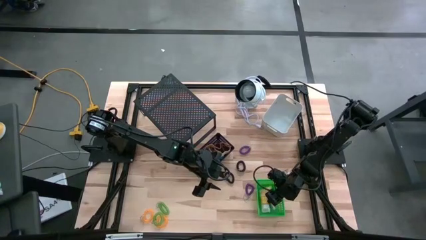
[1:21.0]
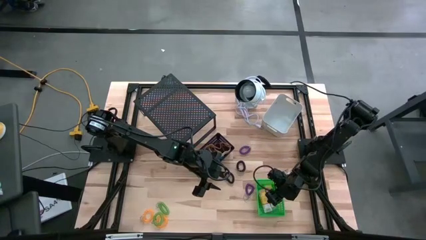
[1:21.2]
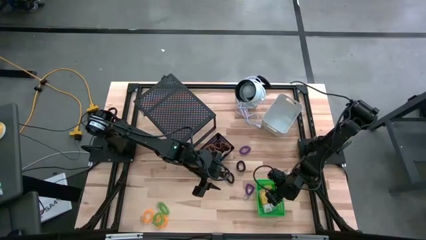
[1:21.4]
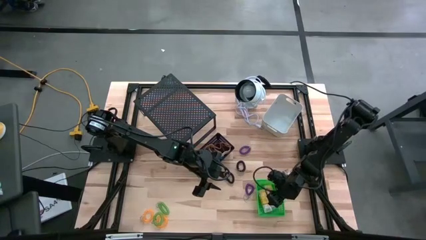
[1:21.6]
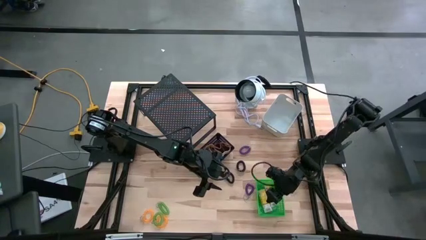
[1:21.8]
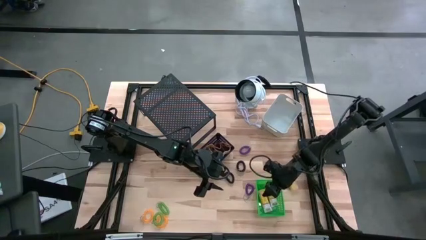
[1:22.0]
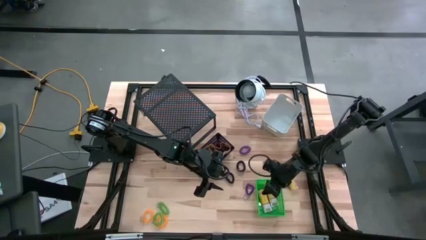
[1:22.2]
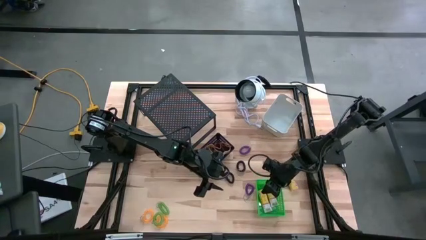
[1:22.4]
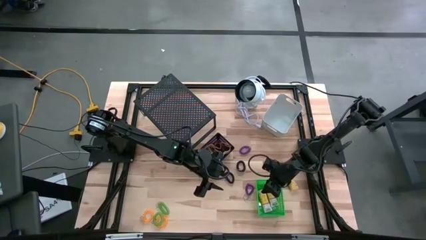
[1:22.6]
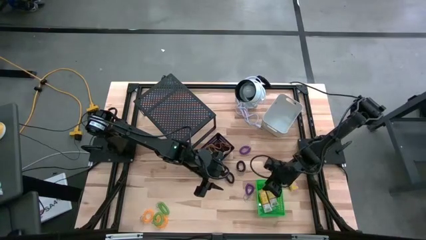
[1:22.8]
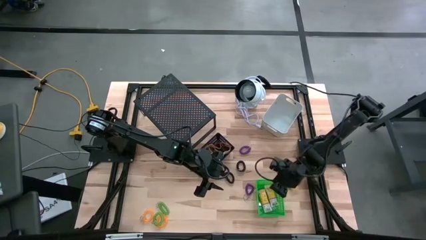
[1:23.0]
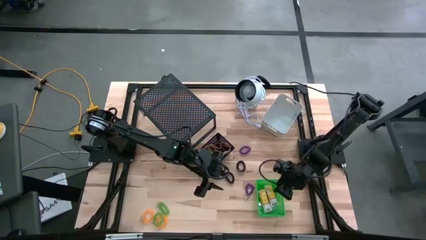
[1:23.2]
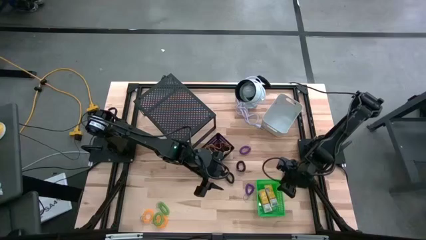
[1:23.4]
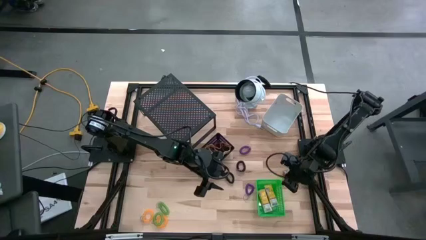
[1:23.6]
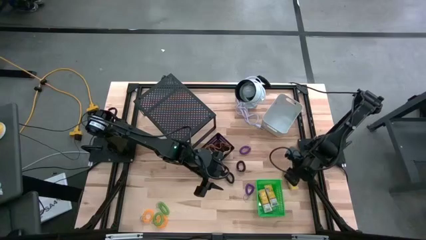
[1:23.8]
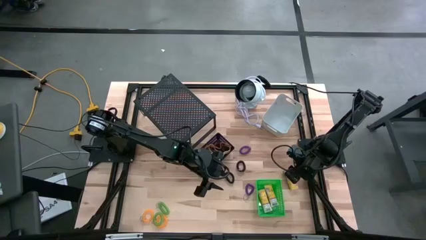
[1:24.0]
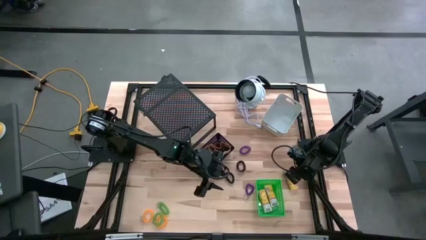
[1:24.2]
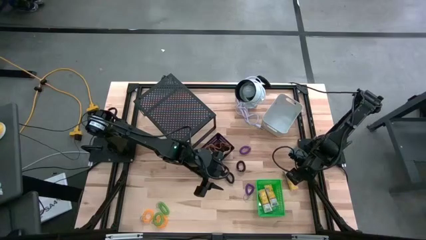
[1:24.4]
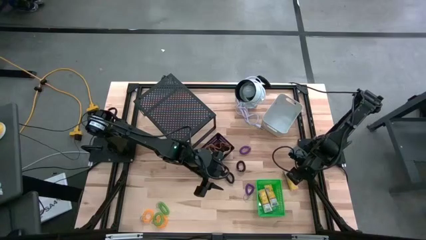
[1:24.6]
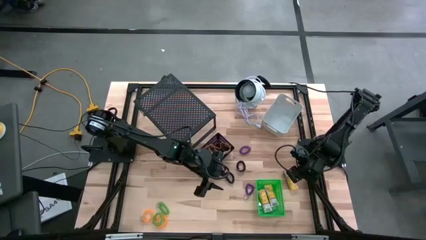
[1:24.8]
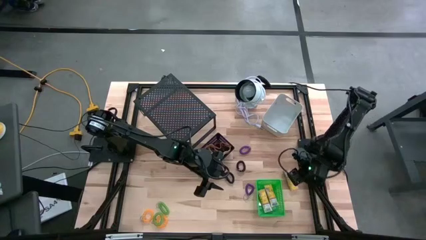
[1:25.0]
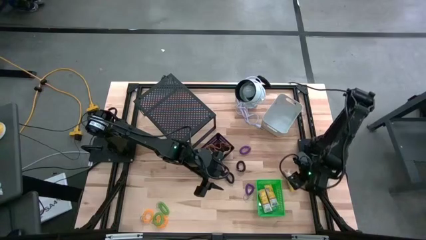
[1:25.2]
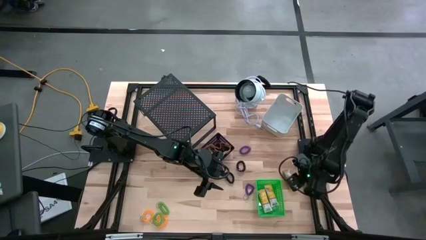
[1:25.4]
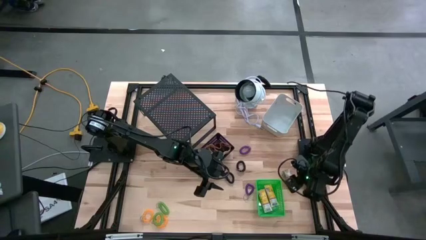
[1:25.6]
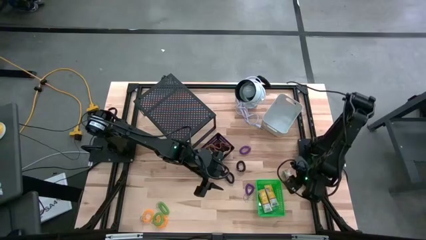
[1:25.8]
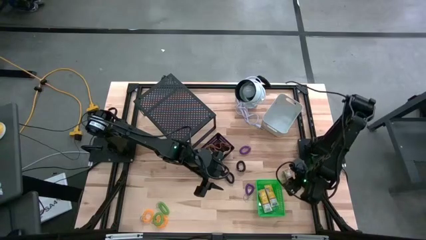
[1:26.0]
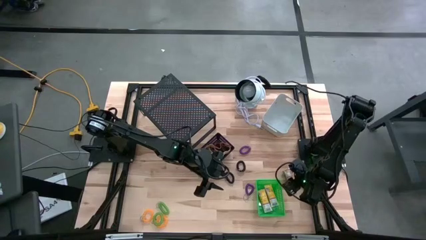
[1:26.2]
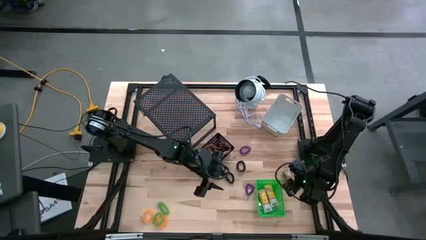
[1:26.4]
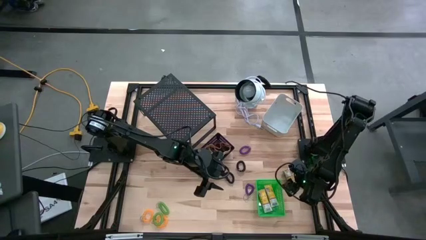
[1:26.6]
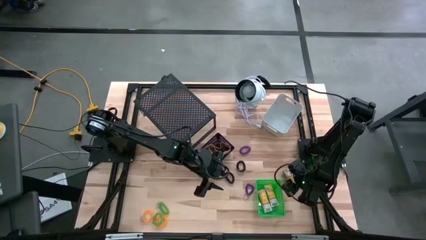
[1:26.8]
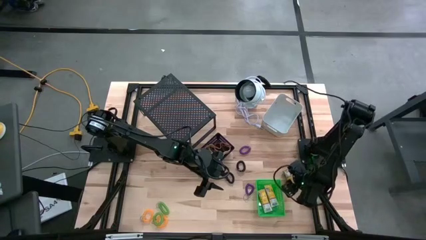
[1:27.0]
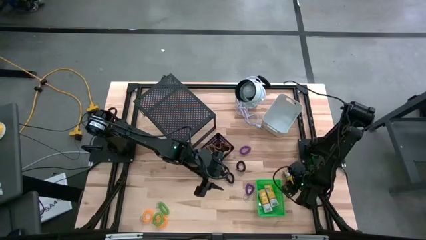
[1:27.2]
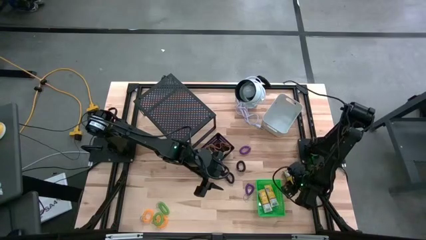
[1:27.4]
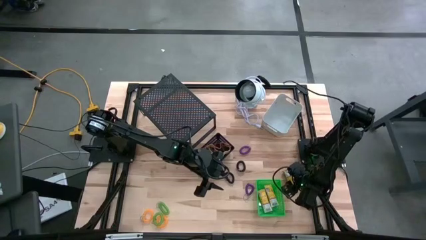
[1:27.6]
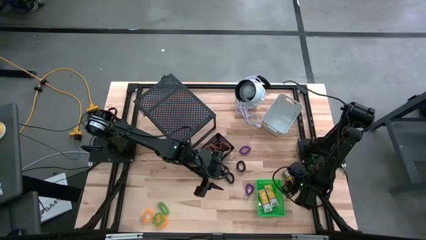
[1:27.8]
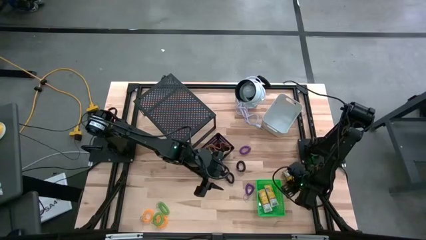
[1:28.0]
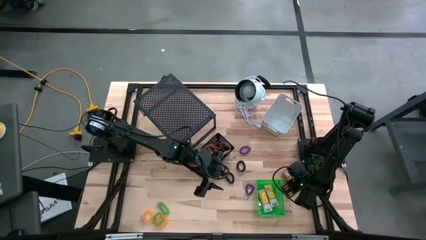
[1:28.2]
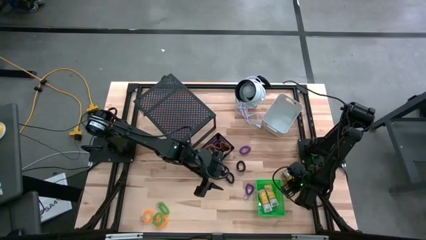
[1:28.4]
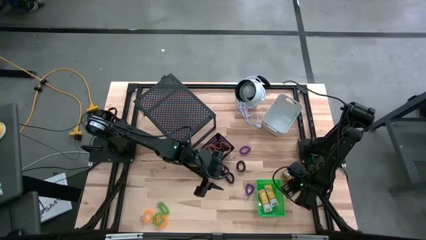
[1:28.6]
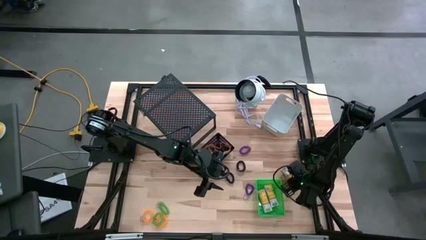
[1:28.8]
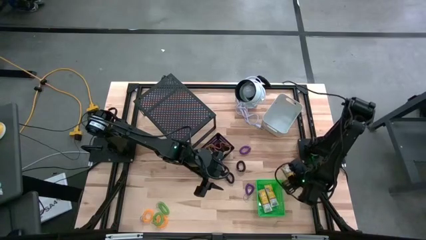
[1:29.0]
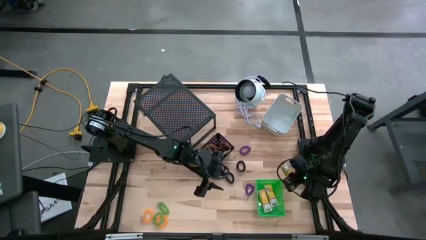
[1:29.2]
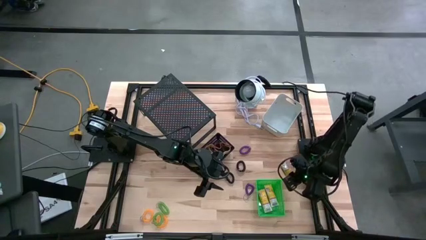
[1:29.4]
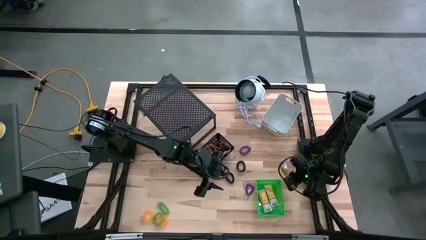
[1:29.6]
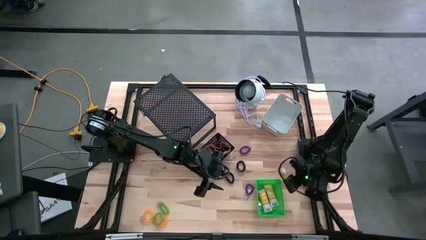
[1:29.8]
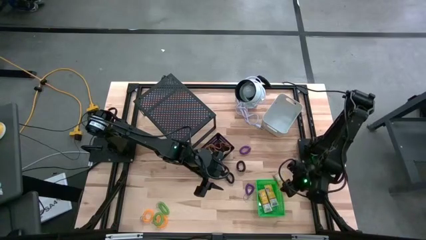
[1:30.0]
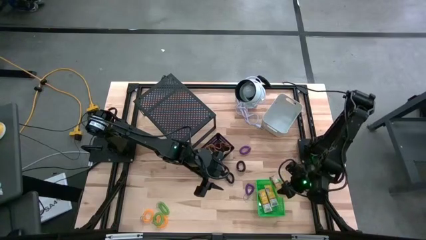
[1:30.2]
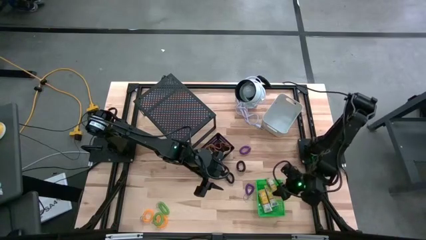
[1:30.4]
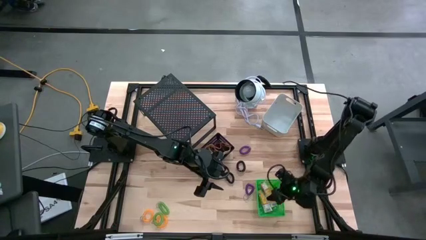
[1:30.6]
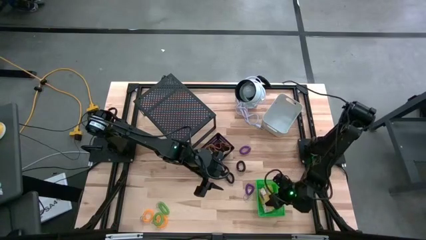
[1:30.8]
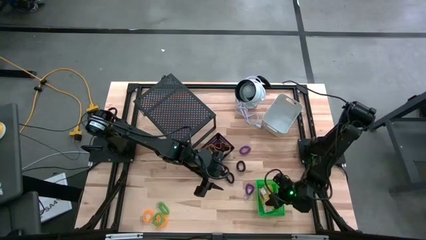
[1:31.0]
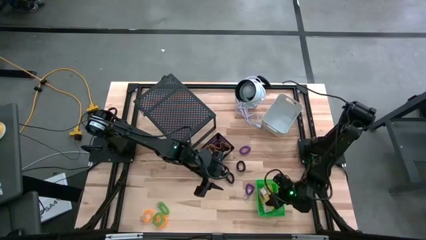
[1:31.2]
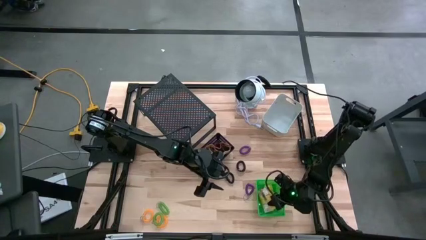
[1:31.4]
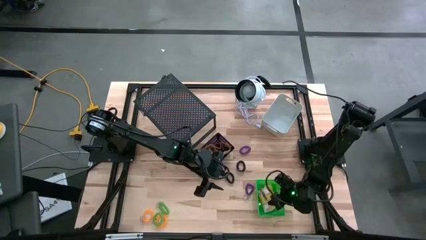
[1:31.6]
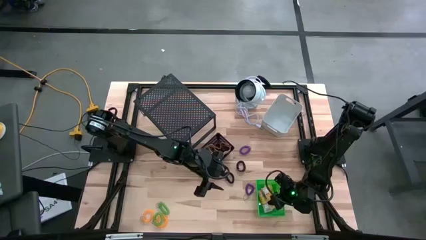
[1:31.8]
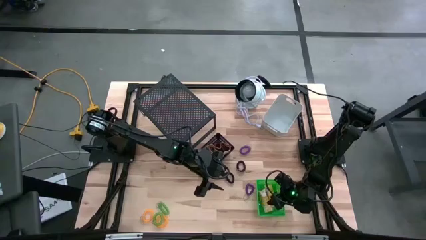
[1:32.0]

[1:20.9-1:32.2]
Task: Pick & Place Office Desk Supplies
Put the crayon box into the green bin

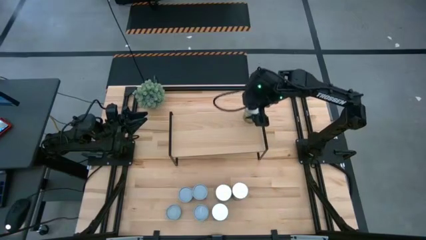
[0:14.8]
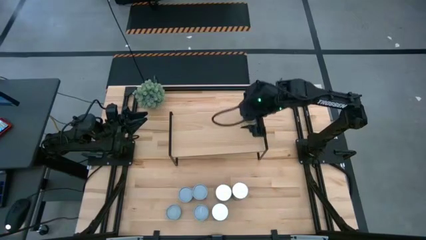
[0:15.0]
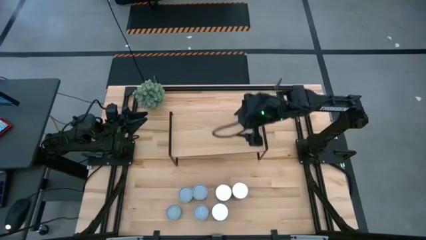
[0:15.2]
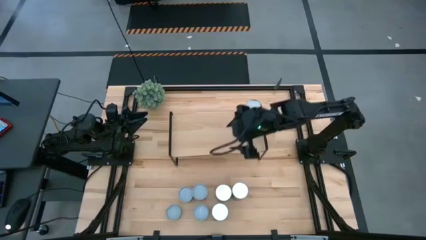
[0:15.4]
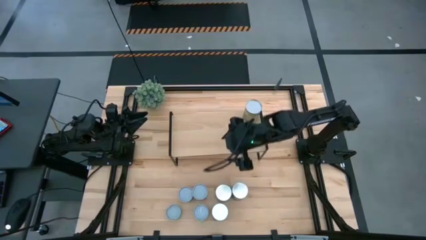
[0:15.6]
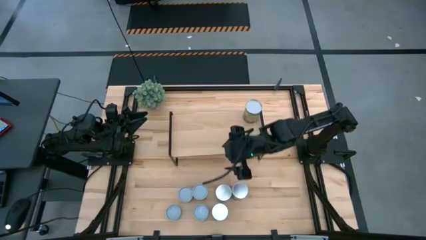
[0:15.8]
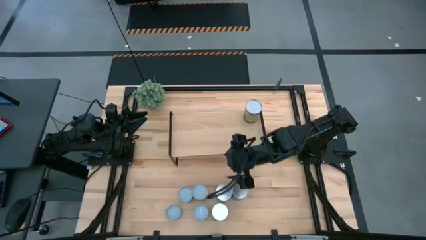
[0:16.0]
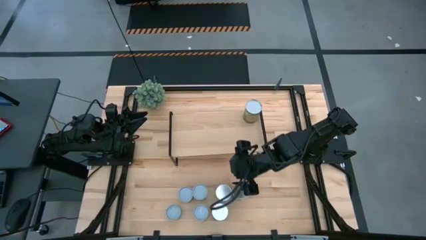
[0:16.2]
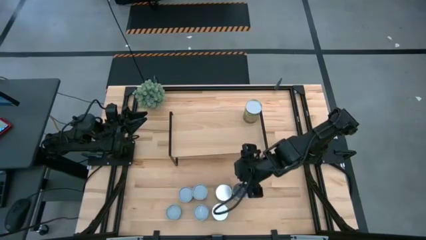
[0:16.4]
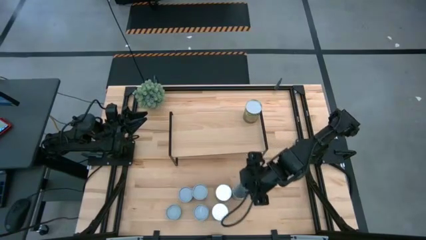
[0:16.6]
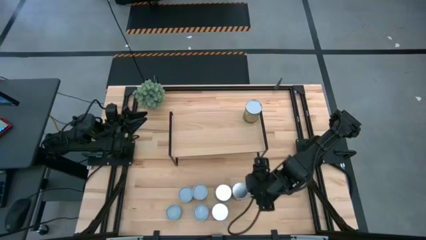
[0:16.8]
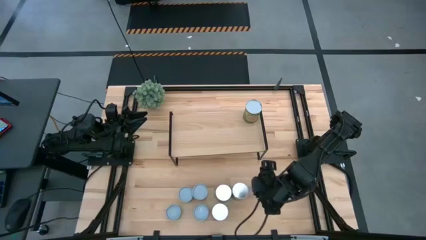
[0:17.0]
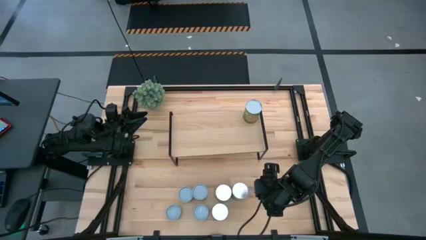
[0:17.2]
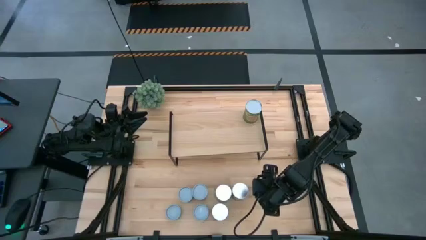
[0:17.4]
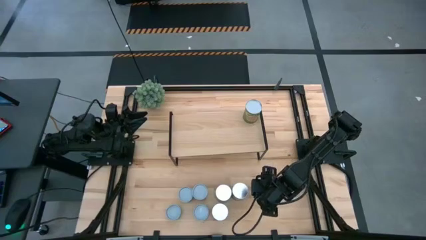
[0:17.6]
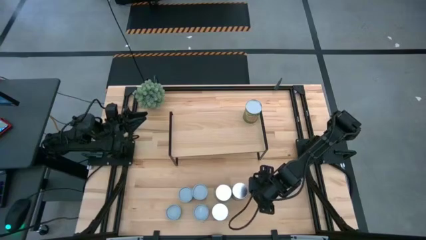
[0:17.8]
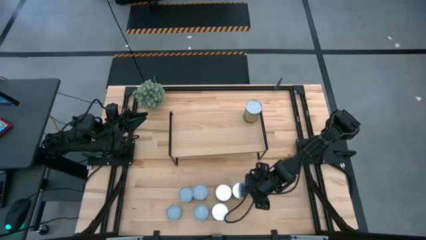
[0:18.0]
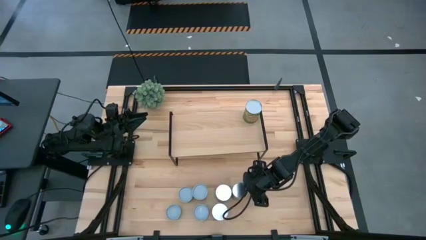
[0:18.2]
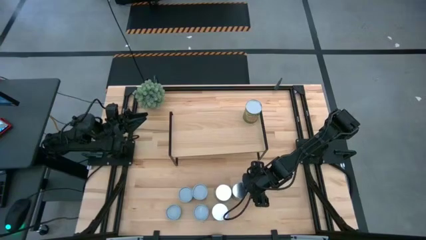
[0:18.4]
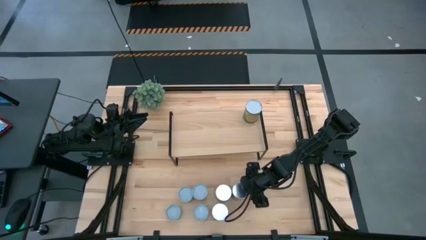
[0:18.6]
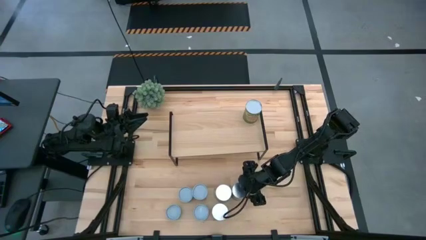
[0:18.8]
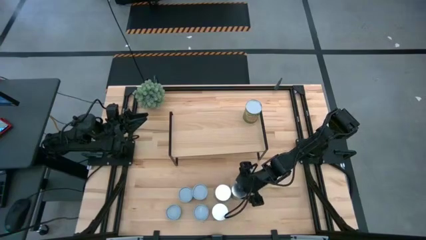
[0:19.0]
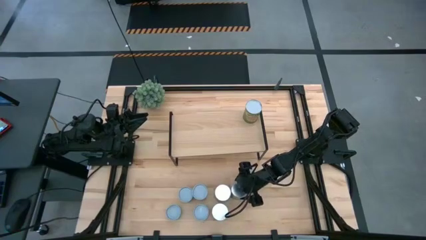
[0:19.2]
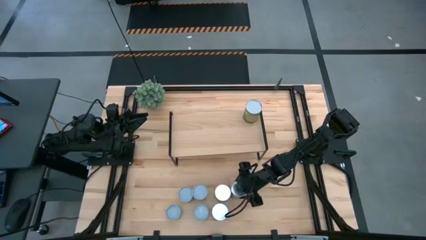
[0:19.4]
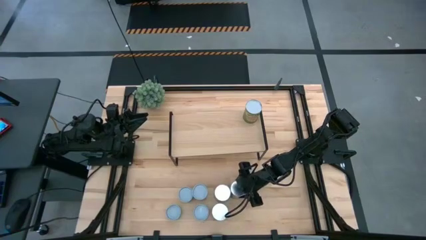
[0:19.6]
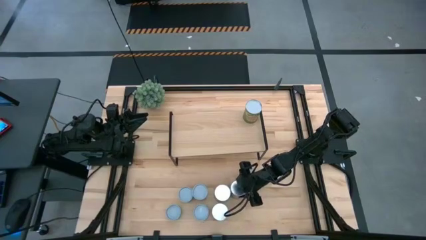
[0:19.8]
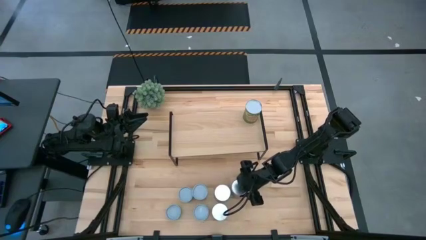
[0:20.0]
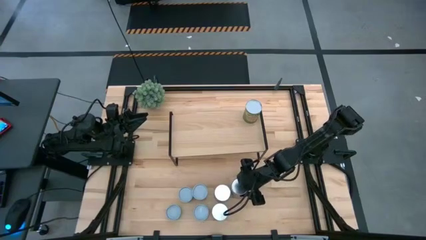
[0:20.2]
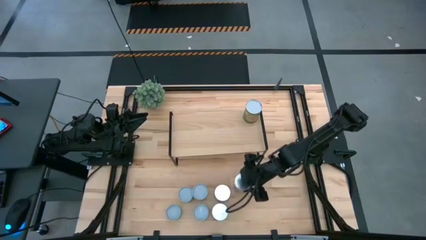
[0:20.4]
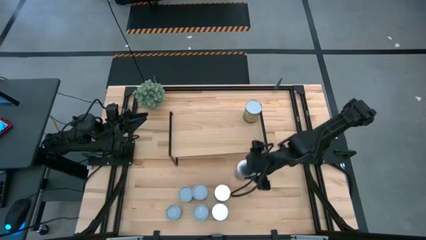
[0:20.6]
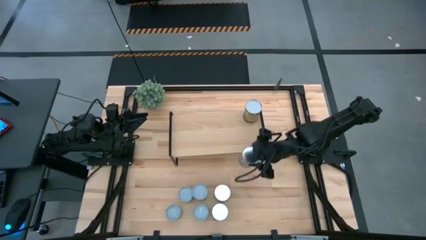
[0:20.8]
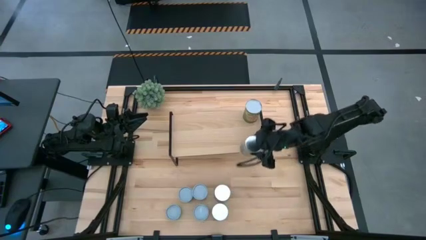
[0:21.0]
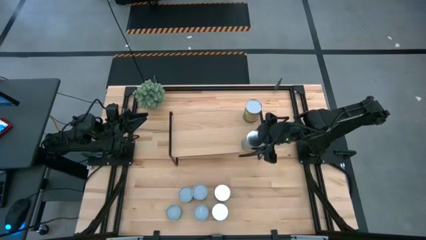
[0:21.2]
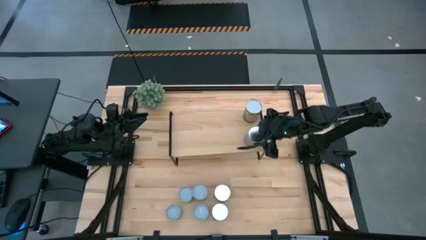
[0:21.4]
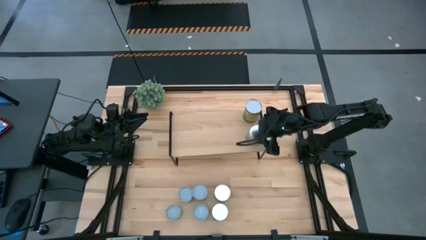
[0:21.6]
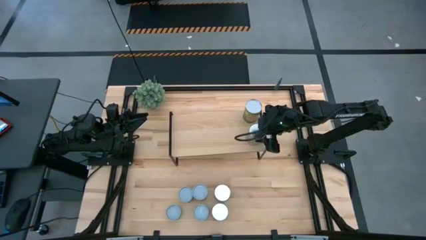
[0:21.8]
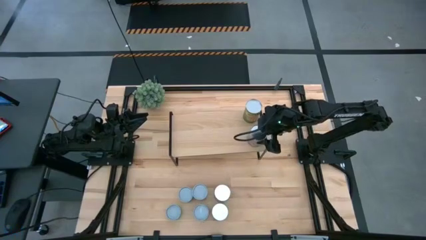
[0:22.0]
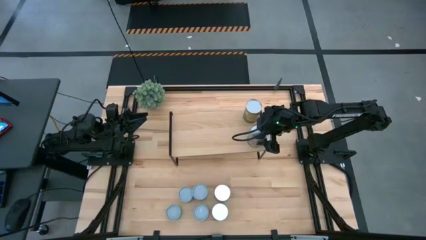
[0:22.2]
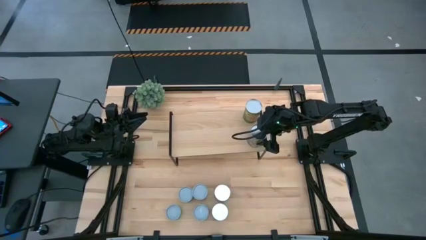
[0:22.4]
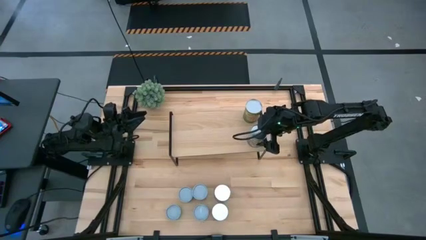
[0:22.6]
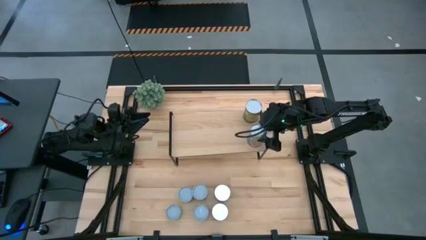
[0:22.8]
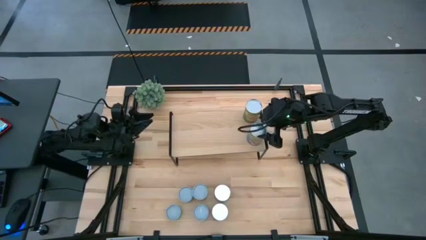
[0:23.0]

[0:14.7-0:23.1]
Task: Pick and place cans onto a shelf
Put the right dark blue can on the shelf aligned with the green can
